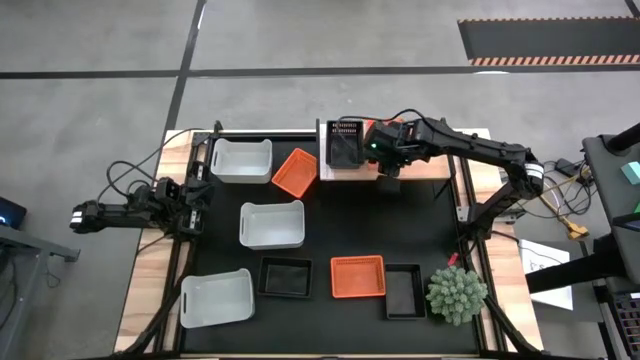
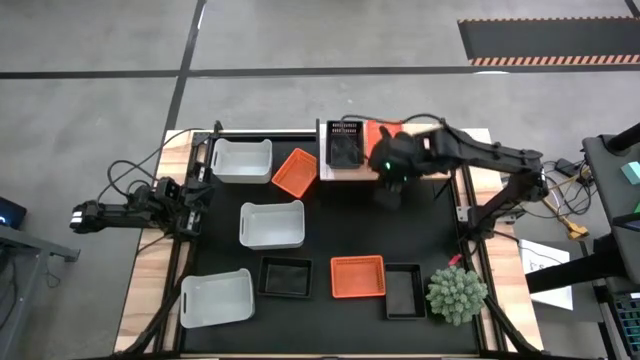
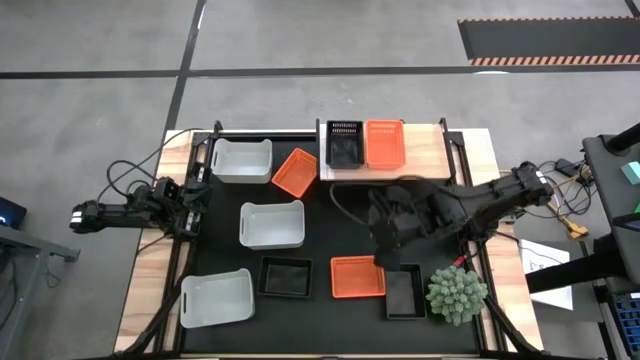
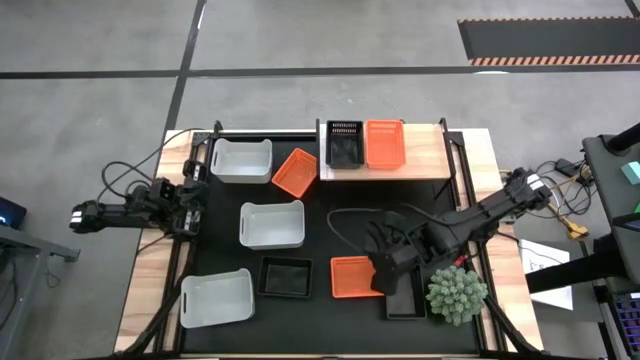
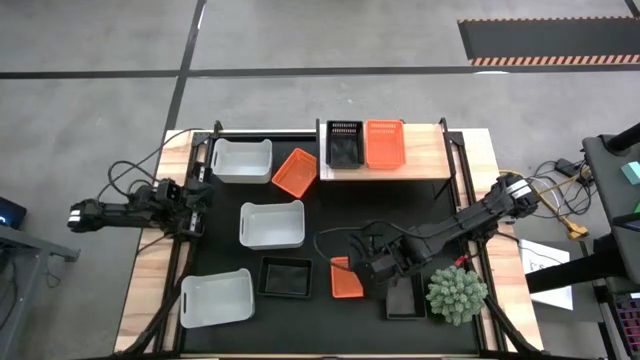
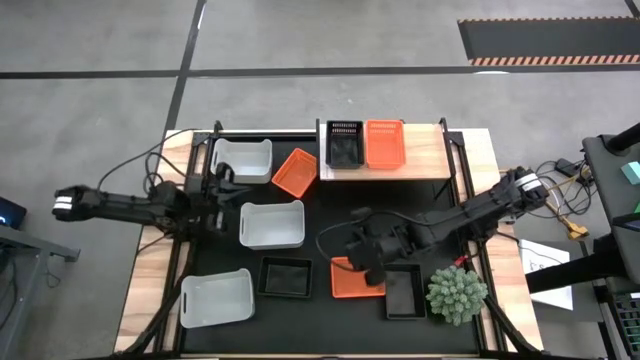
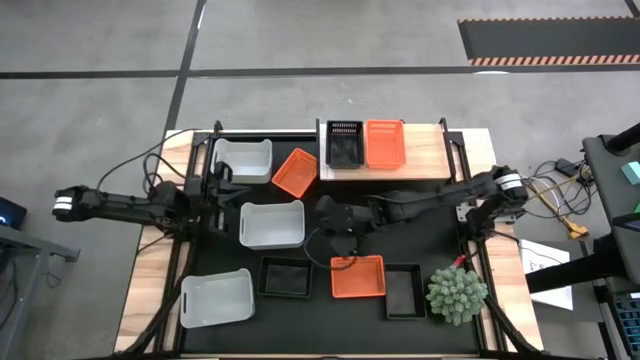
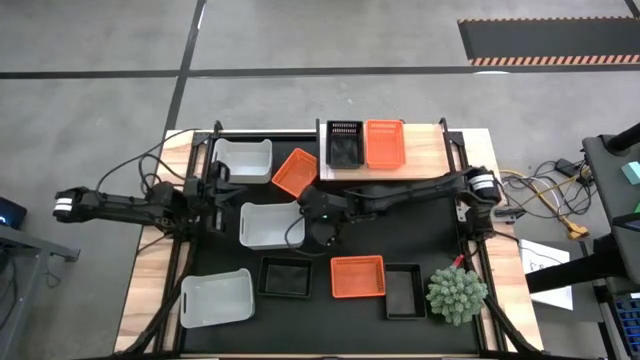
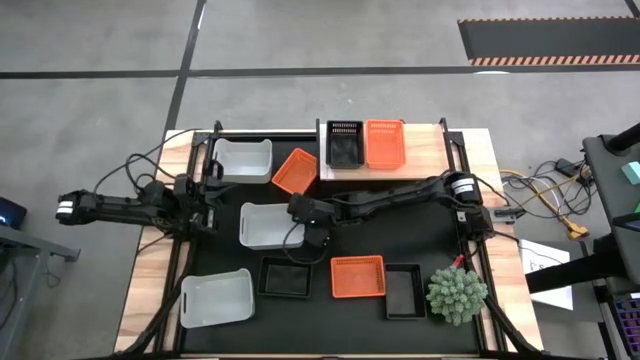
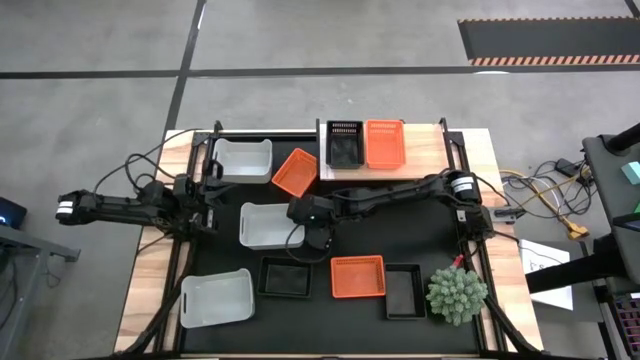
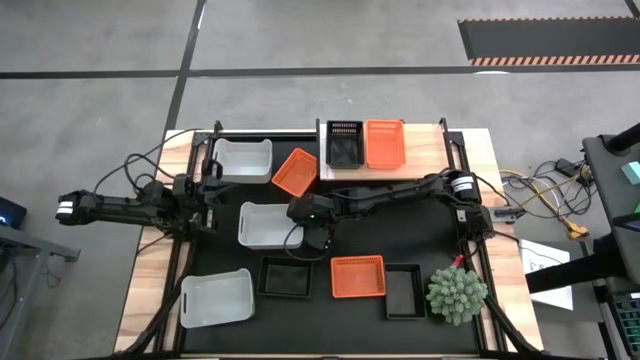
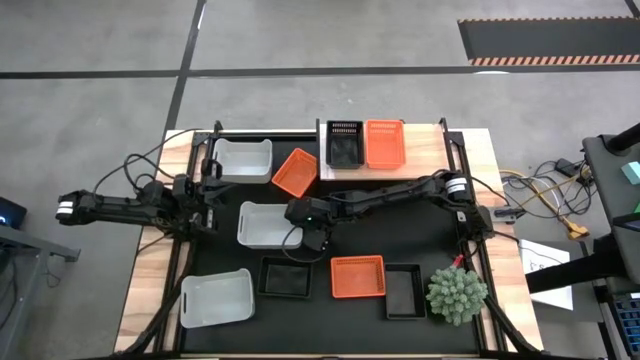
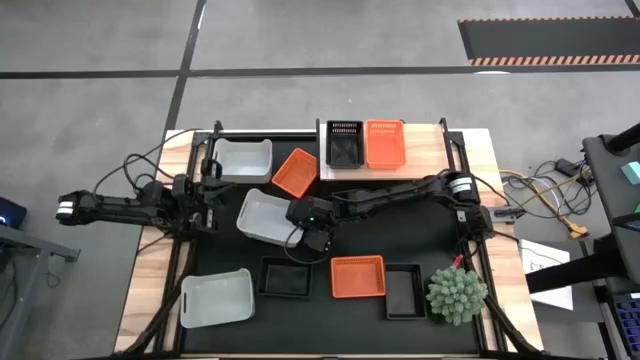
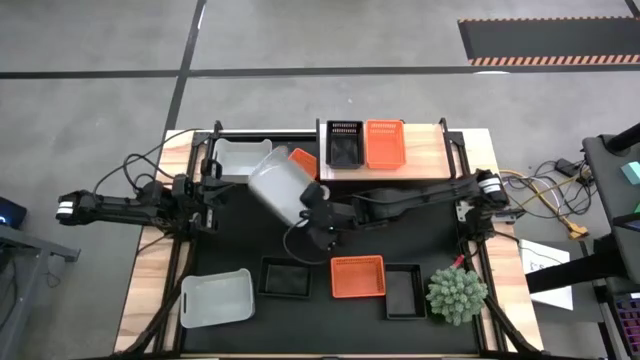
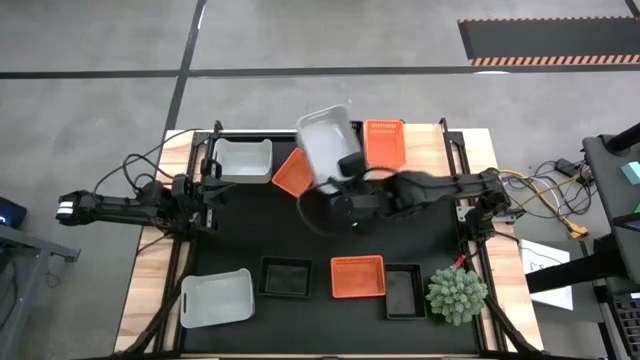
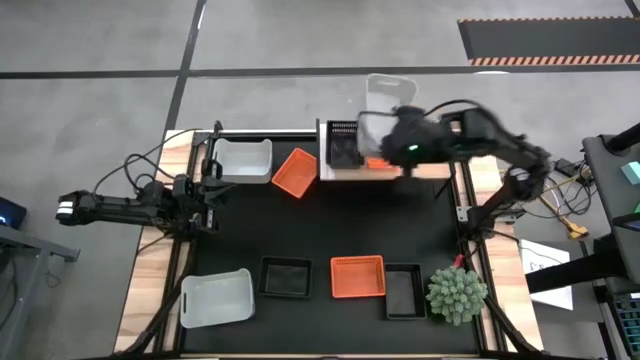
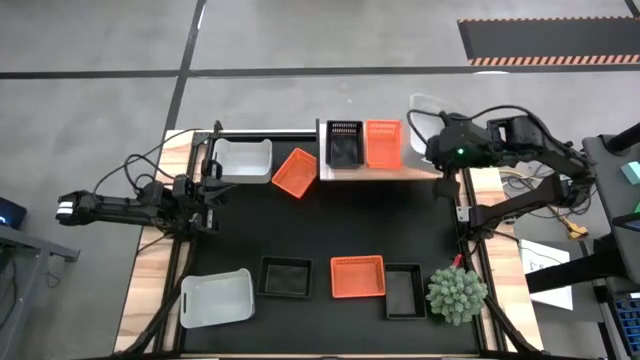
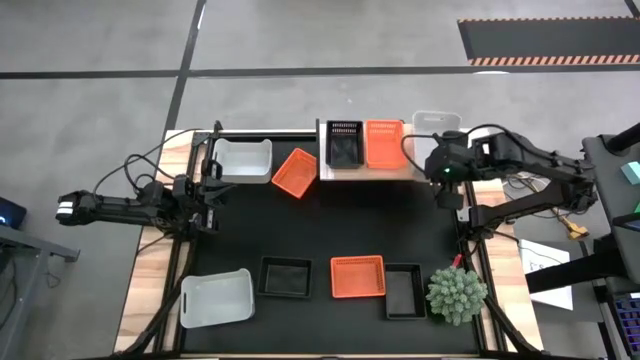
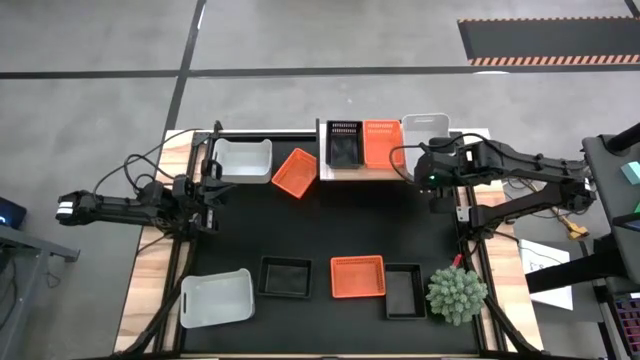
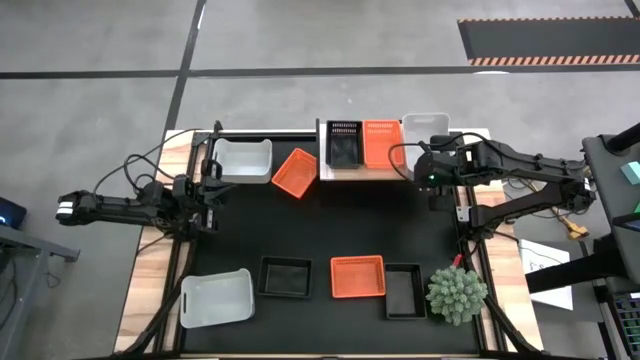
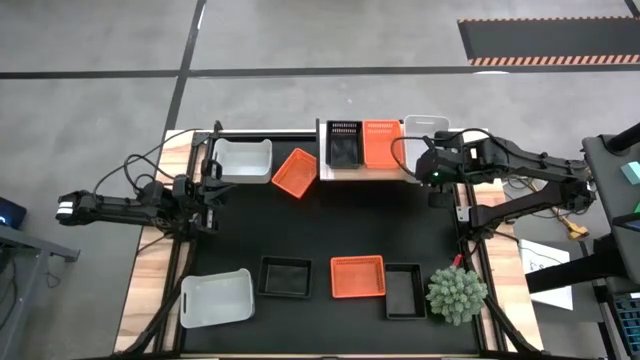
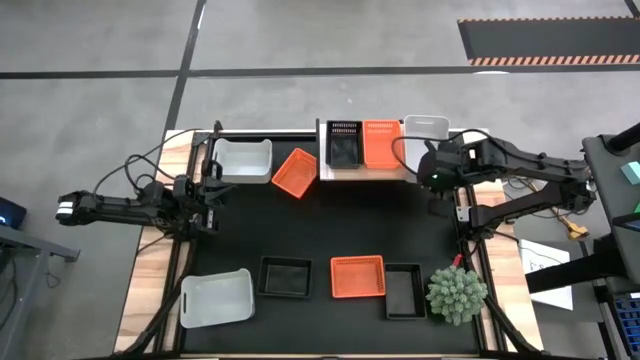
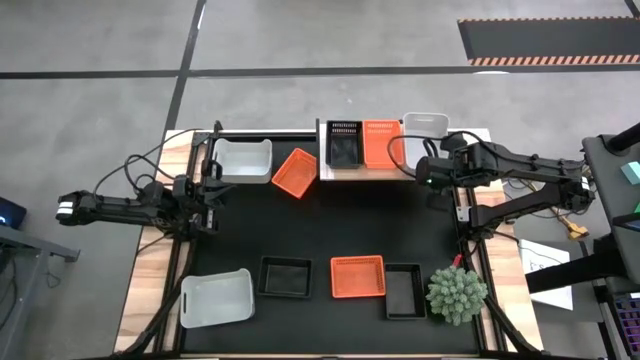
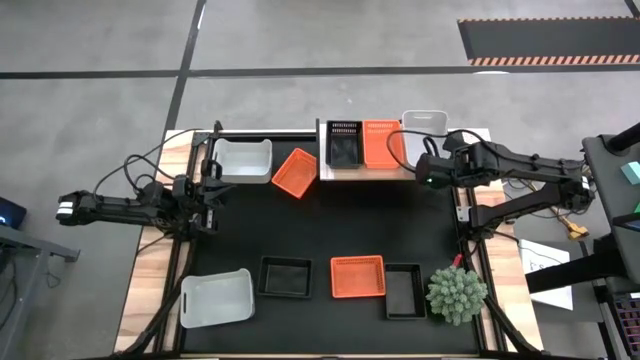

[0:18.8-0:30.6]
Put the middle white bin on the shelf

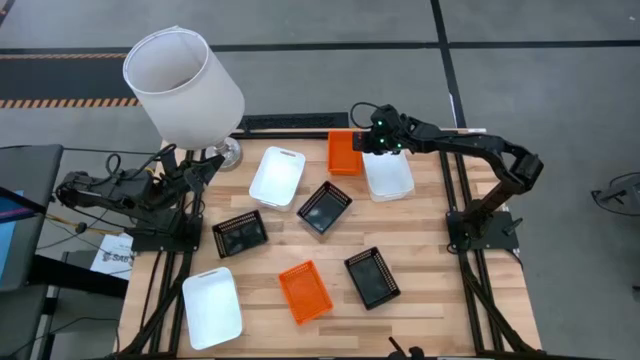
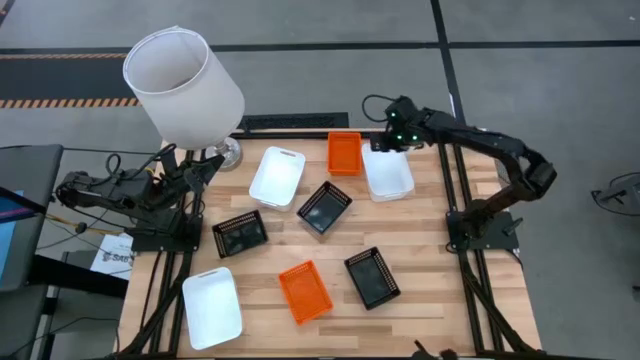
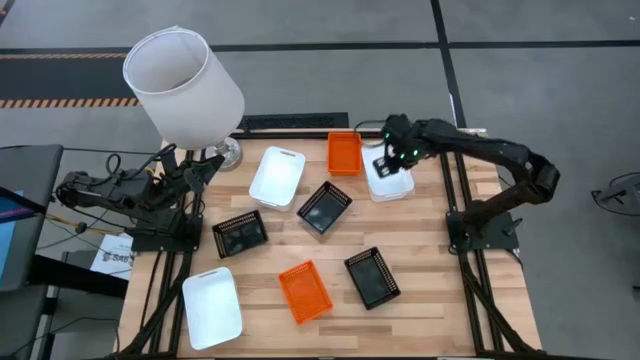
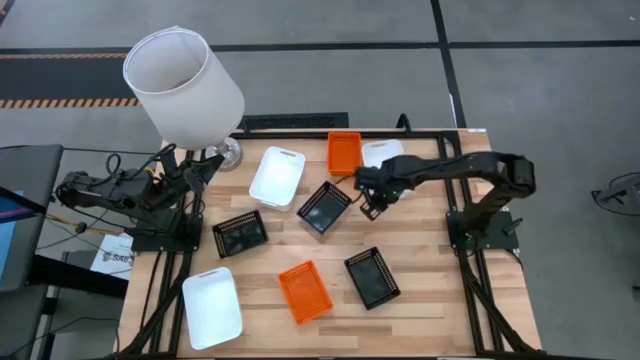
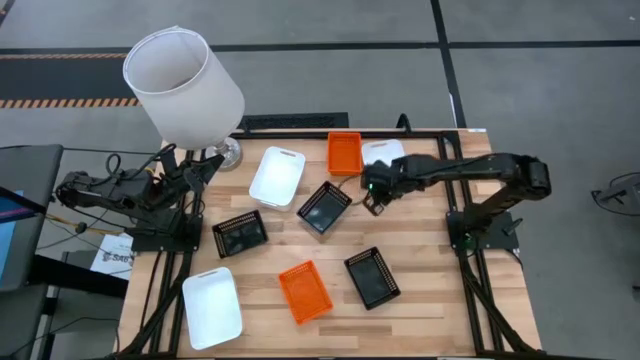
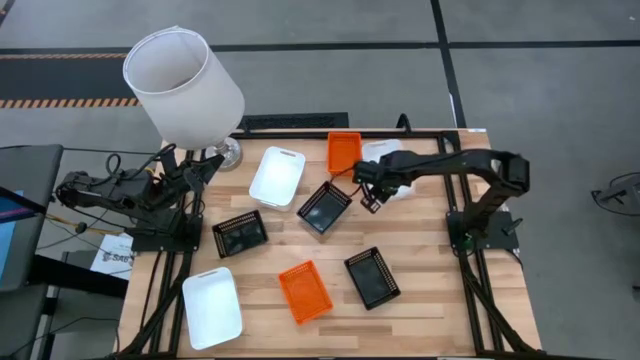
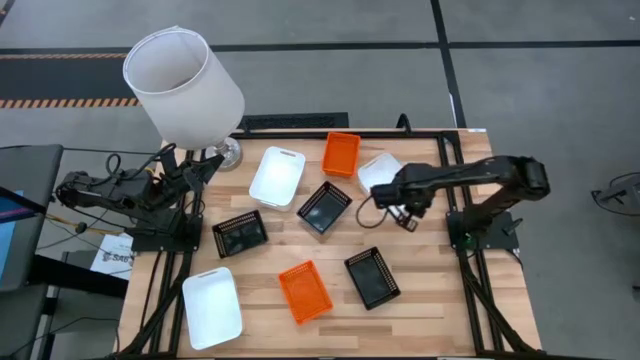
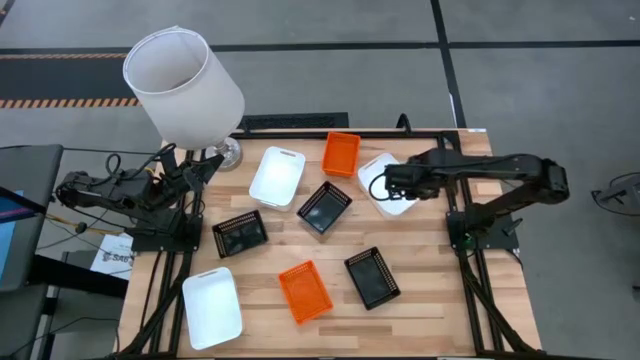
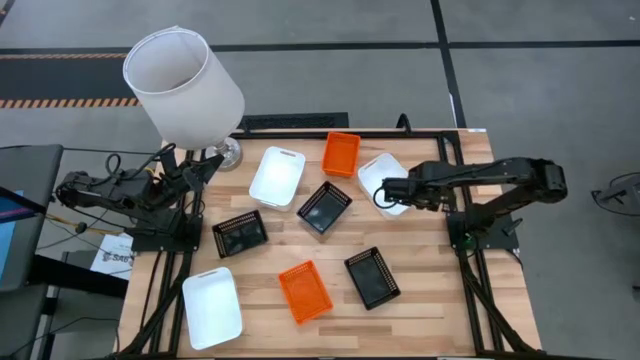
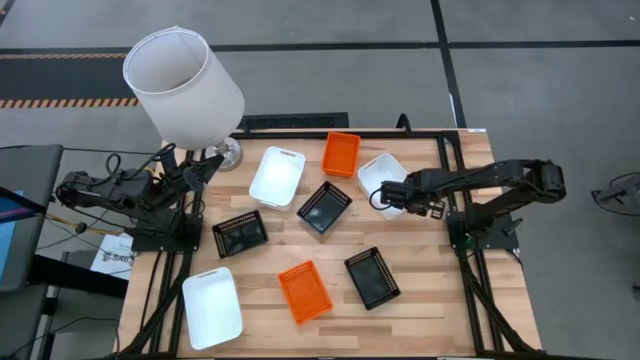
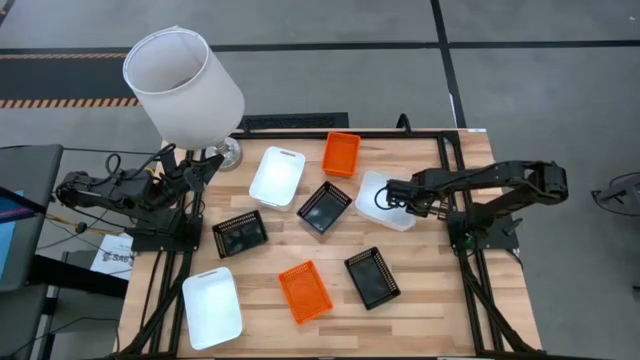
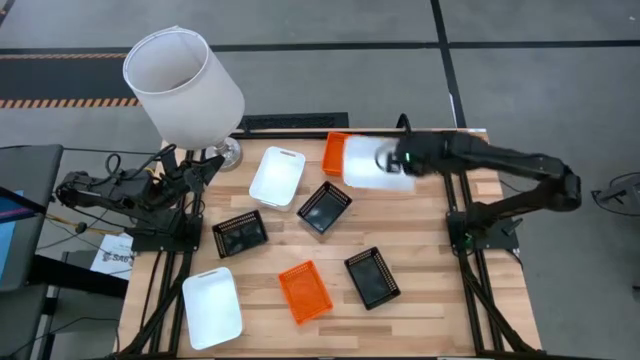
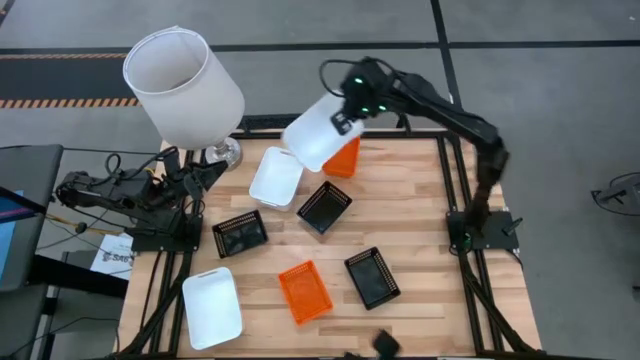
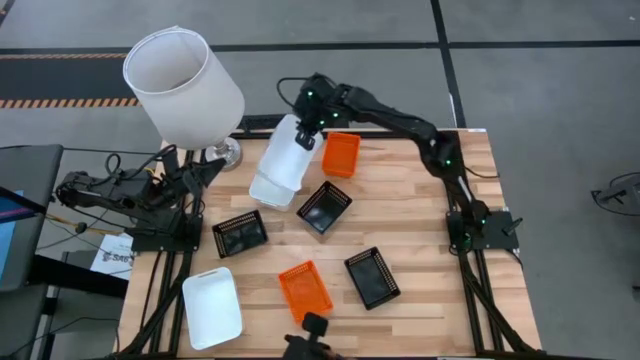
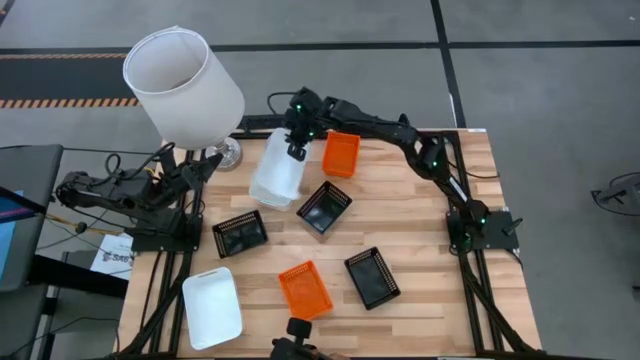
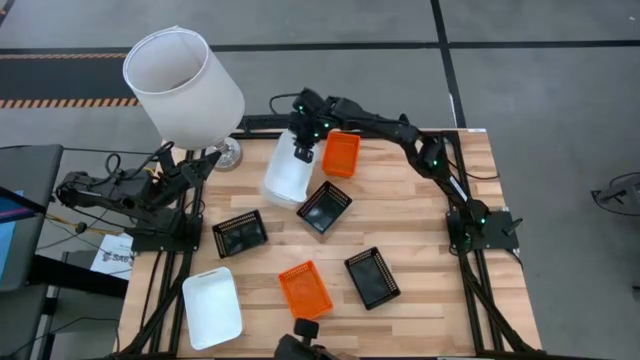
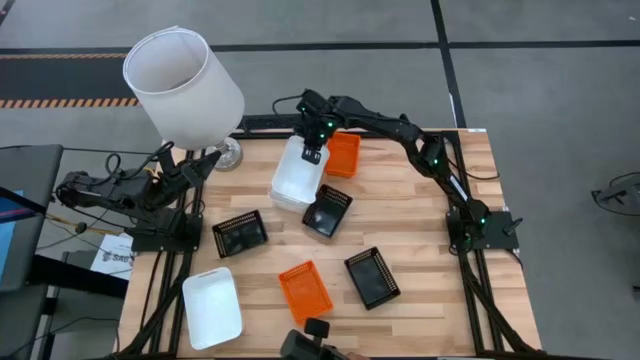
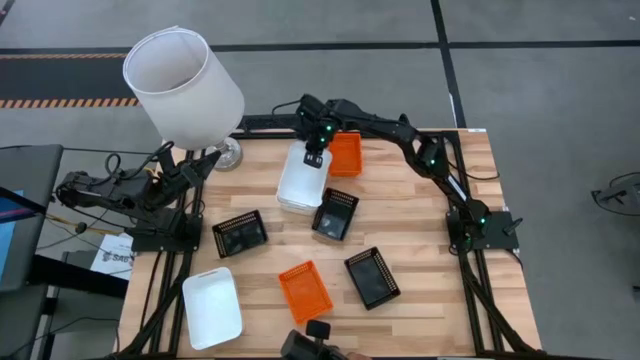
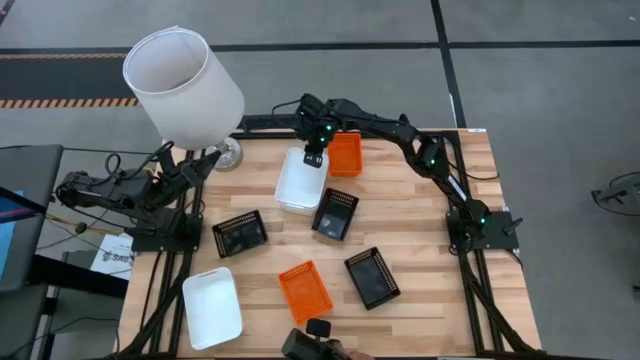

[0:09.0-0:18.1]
Stack the right white bin on the top white bin
